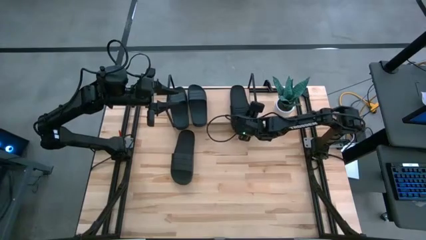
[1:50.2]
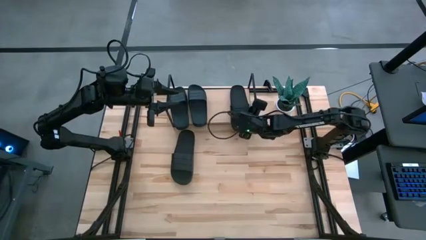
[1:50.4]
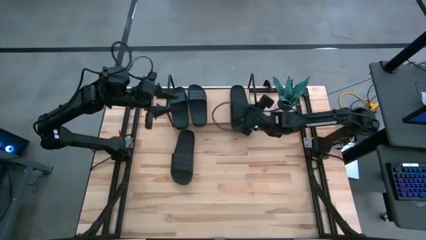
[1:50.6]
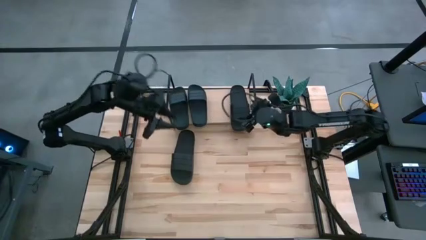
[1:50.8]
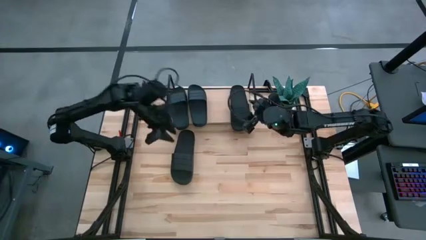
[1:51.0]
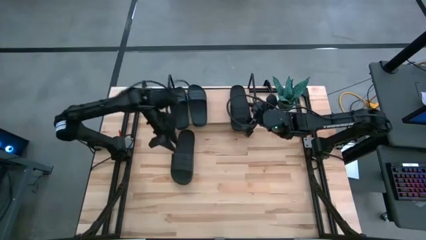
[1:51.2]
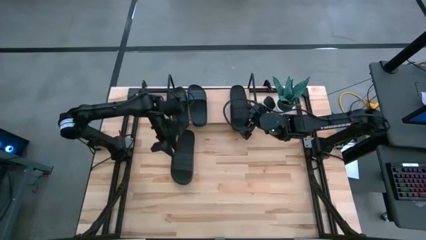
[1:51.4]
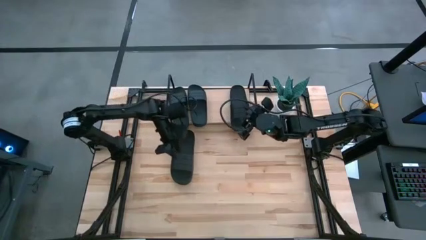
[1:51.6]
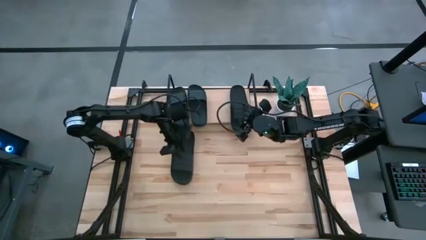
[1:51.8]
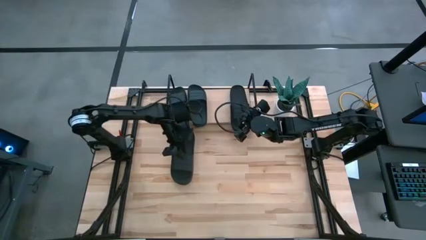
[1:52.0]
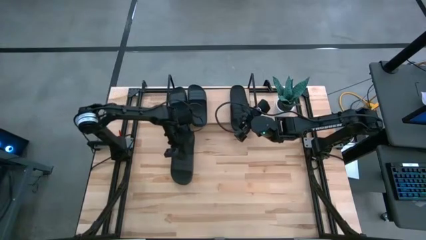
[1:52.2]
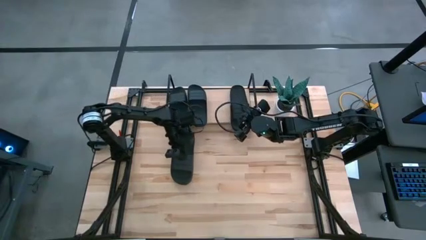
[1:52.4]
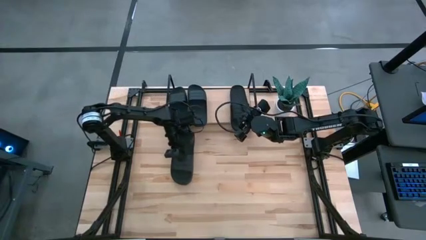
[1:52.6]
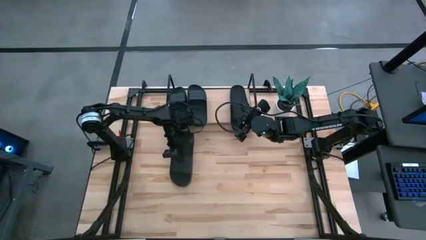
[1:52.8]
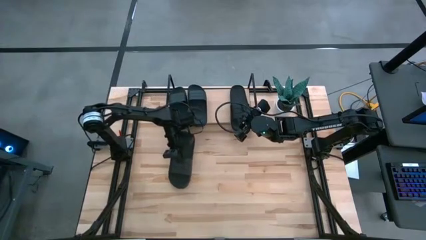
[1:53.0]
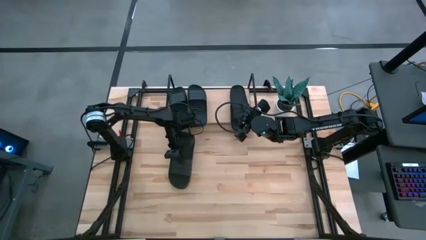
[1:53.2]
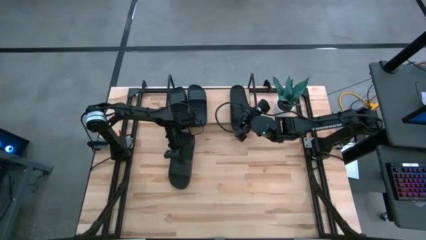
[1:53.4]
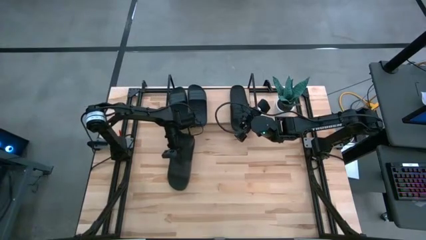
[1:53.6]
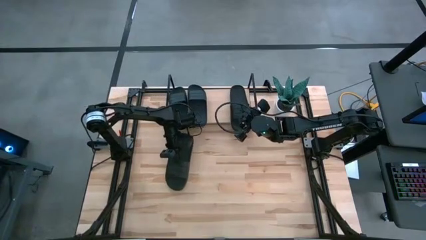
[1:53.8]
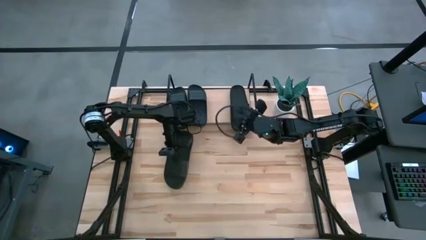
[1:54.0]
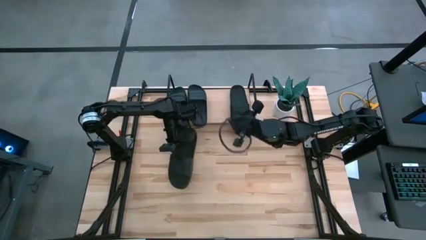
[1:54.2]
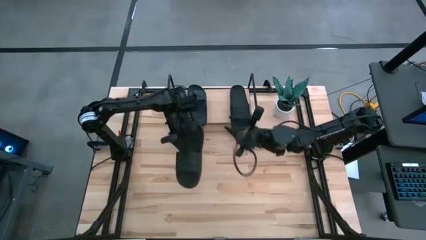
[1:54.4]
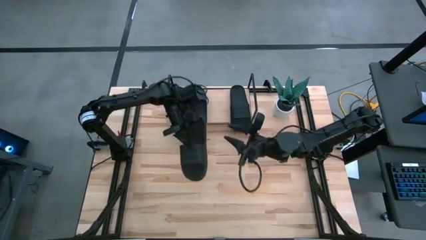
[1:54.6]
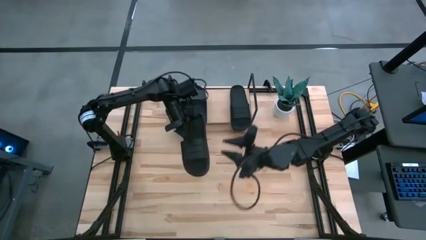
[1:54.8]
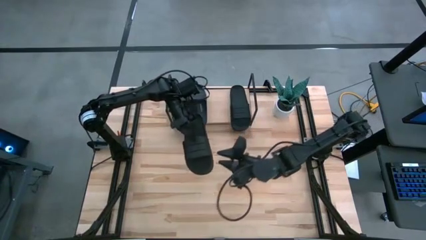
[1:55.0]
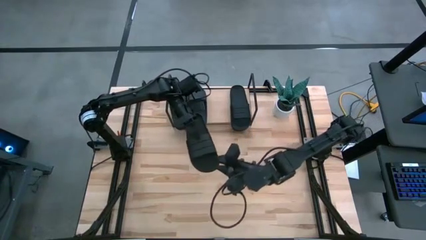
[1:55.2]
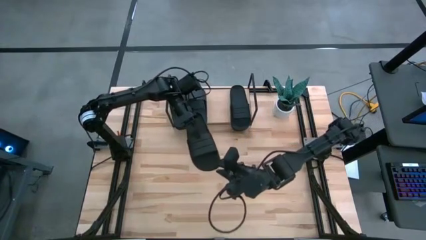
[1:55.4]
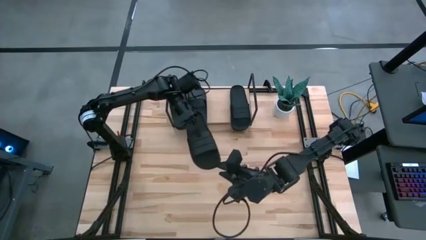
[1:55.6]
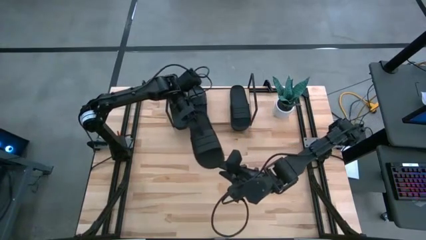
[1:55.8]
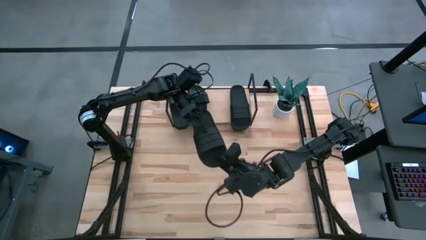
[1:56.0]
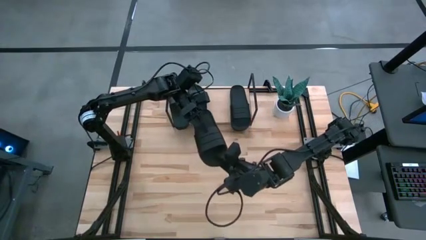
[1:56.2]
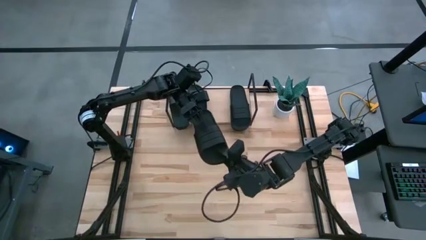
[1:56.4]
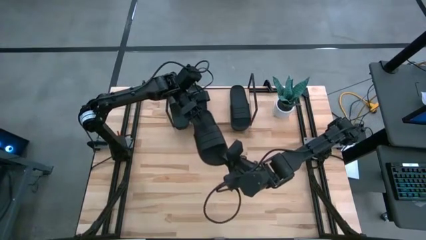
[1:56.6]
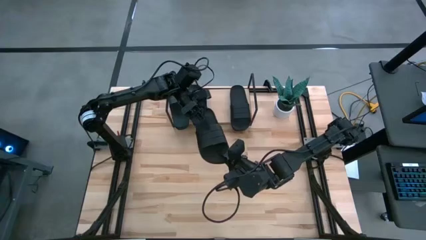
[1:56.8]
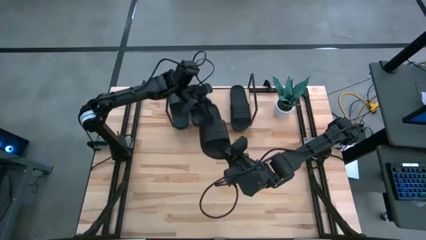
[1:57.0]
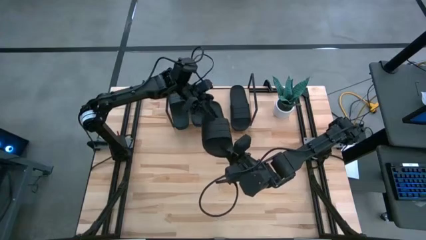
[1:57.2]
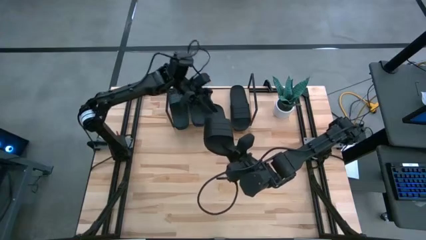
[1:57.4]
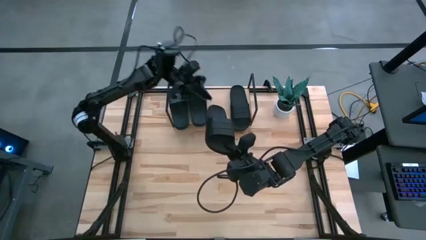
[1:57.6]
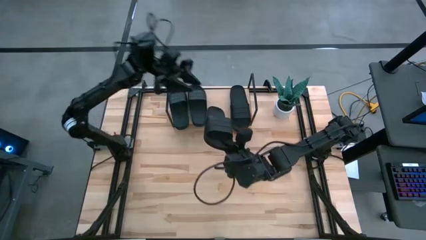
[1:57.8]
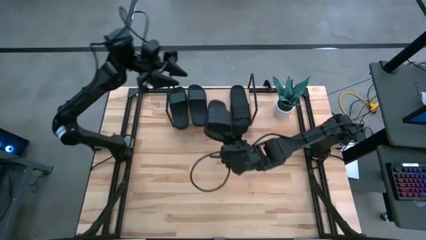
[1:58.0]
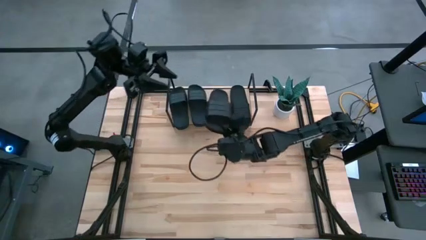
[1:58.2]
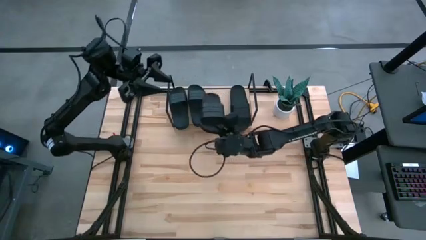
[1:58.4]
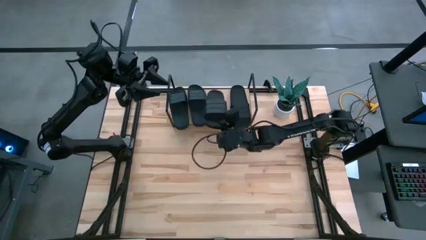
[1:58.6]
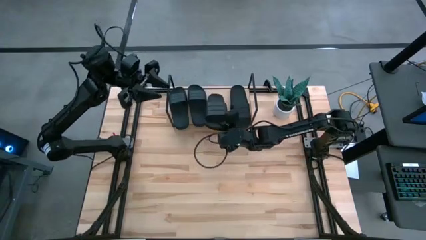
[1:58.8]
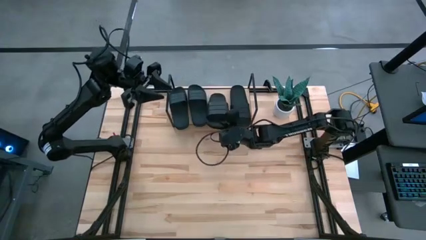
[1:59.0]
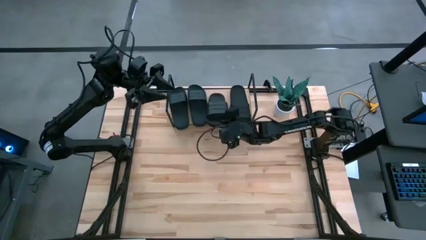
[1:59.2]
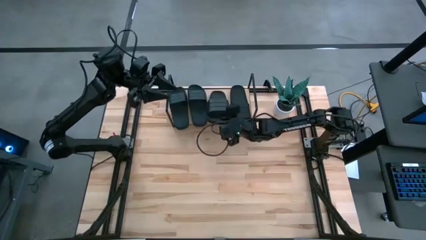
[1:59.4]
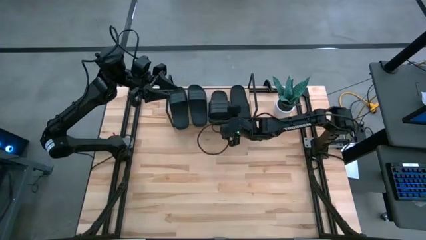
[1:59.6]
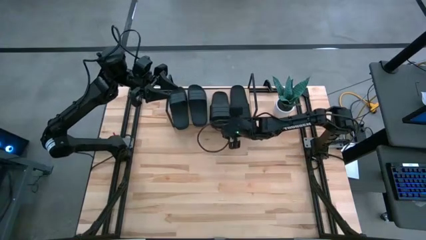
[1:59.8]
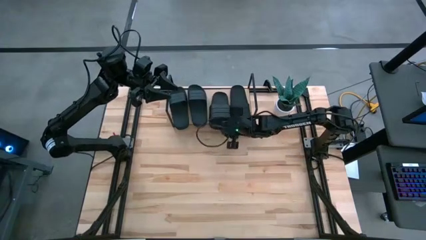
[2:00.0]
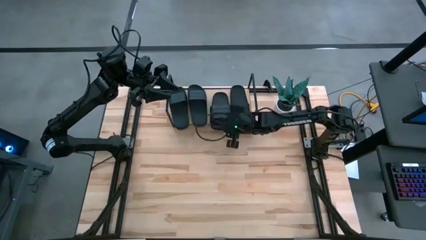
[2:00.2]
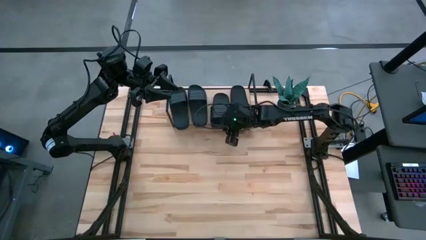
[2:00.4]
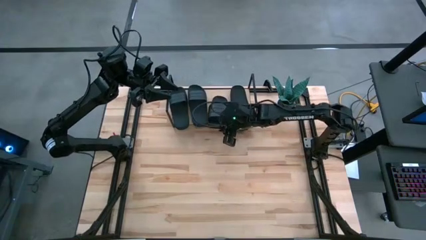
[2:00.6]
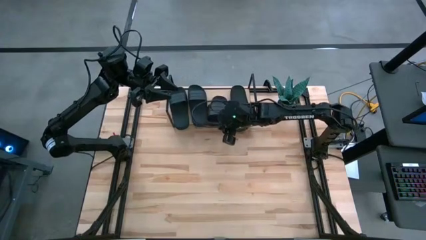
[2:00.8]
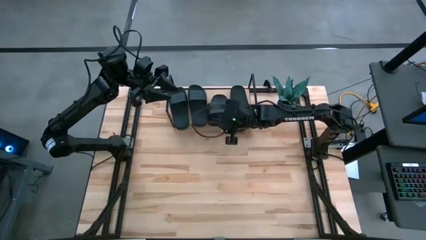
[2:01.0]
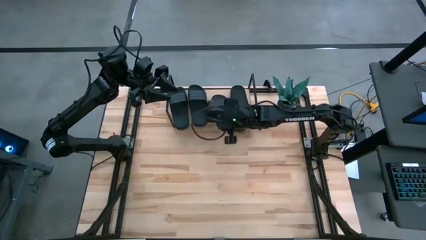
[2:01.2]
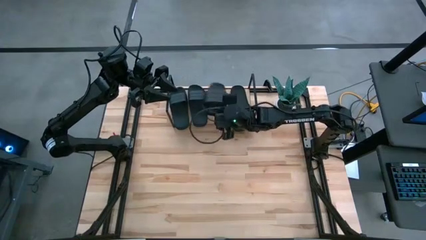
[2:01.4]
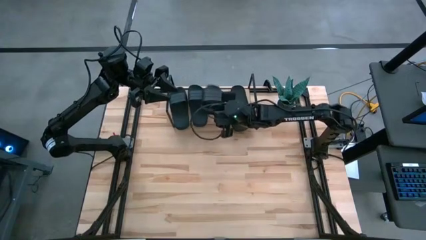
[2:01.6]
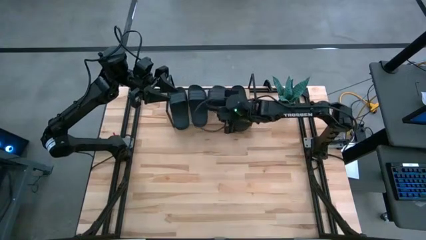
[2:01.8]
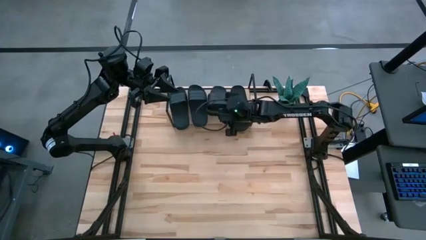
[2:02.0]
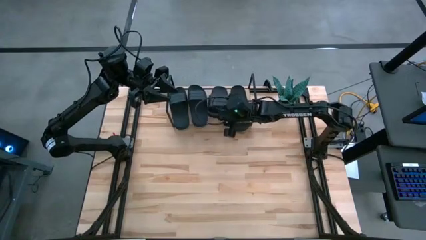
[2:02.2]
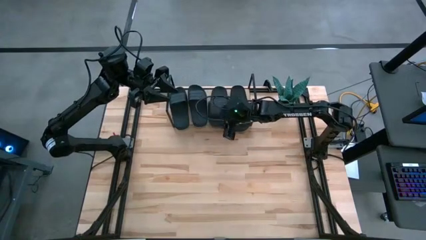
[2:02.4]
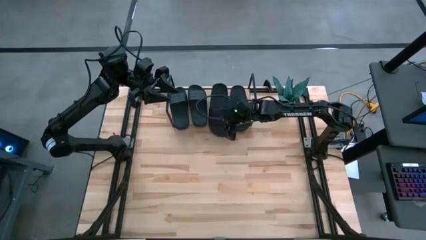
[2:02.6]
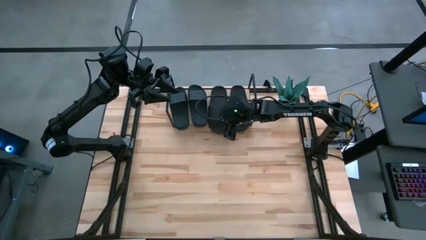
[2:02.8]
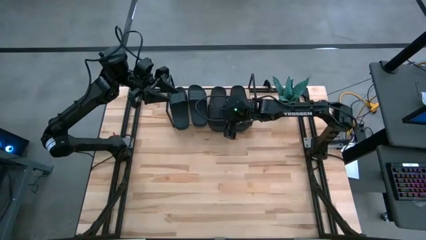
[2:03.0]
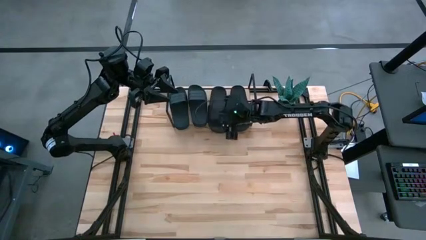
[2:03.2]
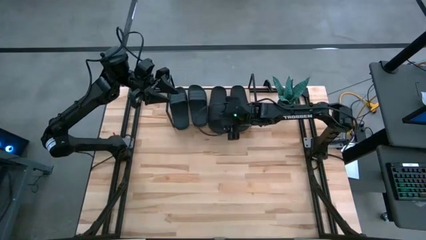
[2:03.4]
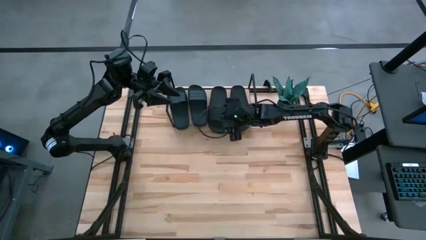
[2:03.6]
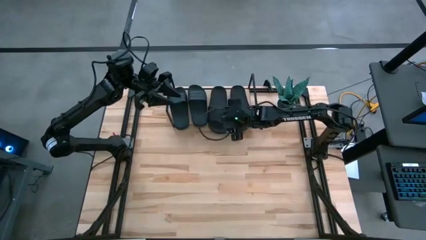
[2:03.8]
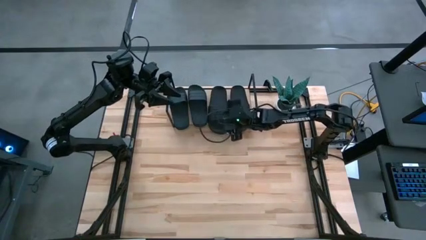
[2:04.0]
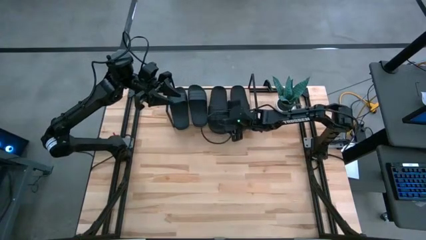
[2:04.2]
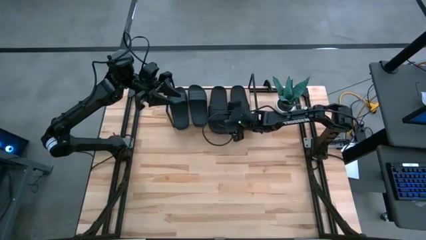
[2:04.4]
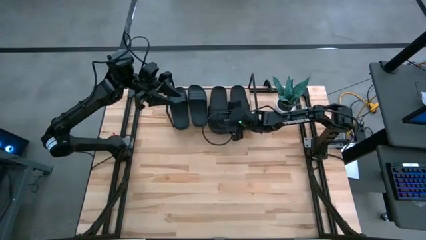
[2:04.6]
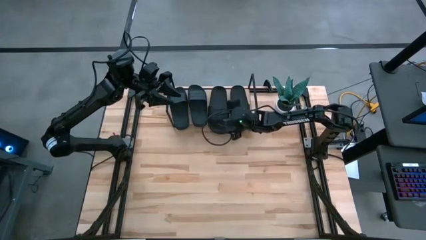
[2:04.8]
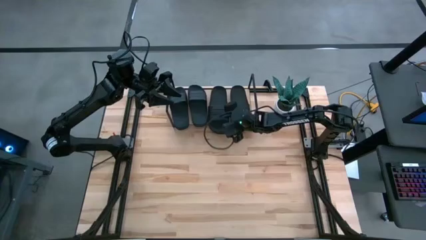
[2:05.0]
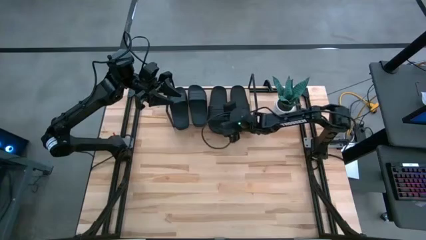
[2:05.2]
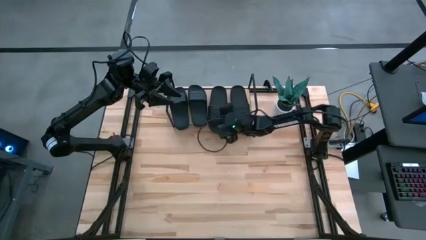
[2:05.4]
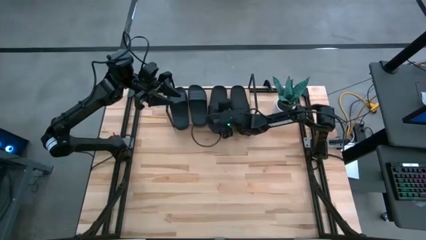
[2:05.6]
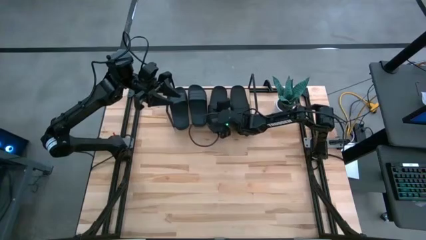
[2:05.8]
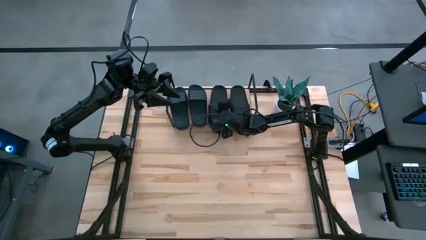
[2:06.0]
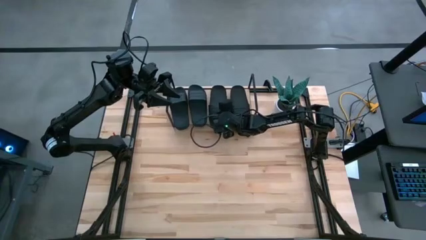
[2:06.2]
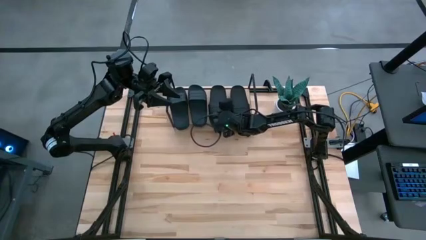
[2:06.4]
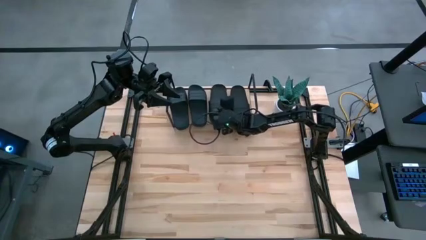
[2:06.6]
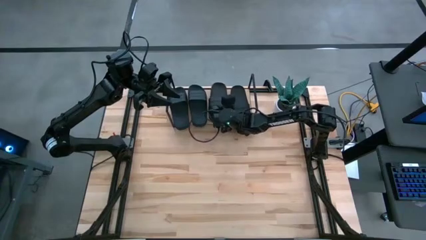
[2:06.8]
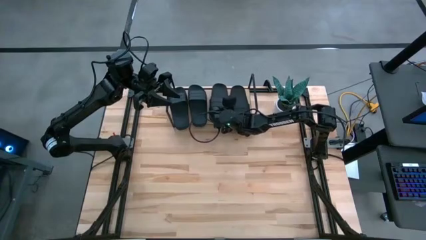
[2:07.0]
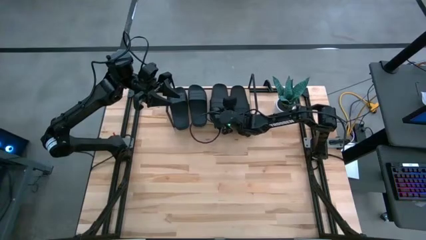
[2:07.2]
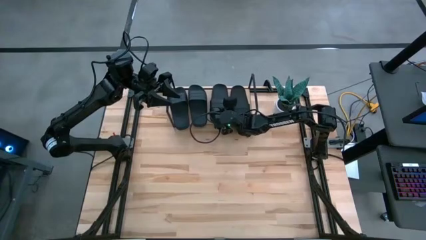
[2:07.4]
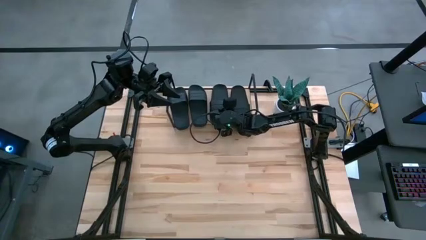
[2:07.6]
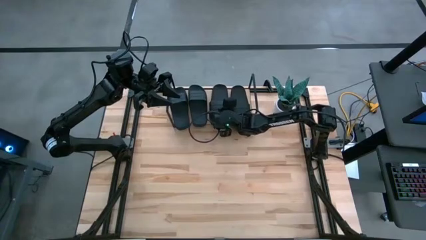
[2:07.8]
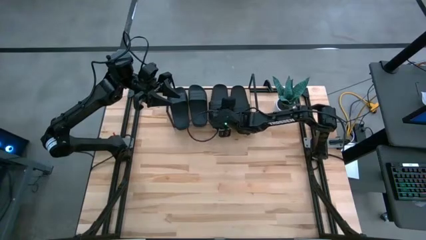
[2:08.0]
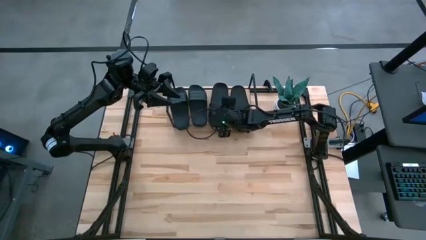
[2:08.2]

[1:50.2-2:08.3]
Task: Pick and place slides into the shelf
Put the black slide on the shelf
